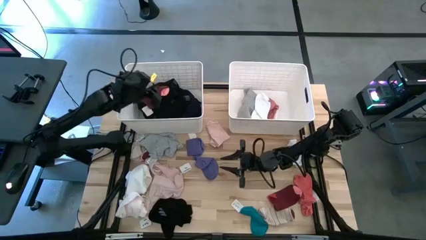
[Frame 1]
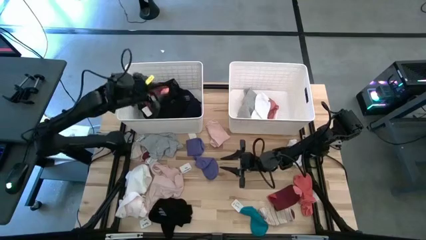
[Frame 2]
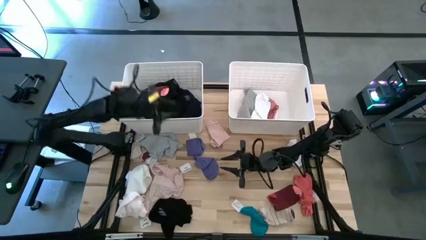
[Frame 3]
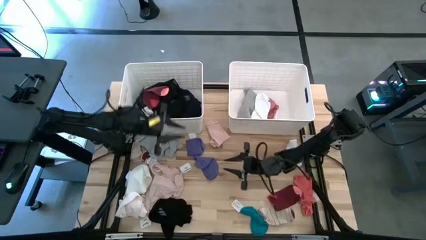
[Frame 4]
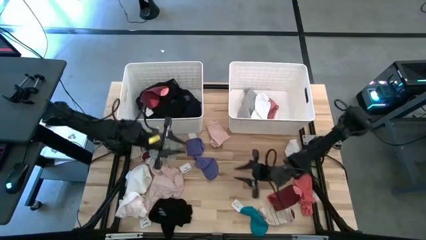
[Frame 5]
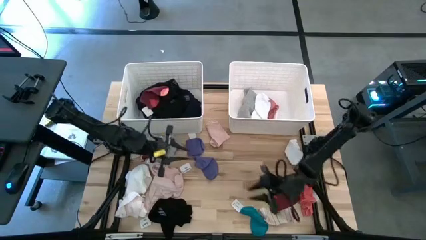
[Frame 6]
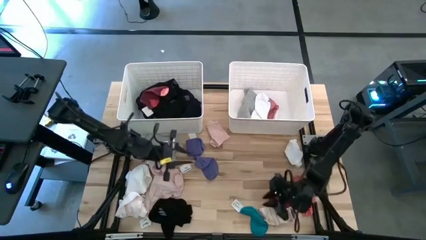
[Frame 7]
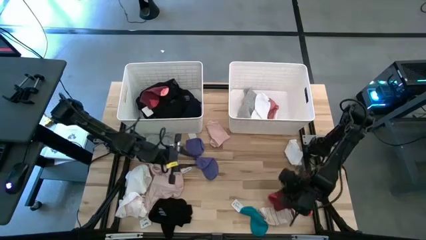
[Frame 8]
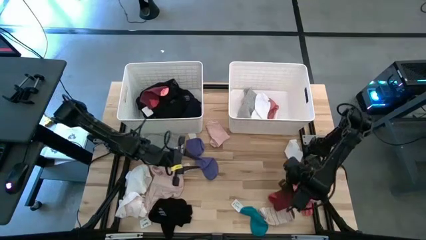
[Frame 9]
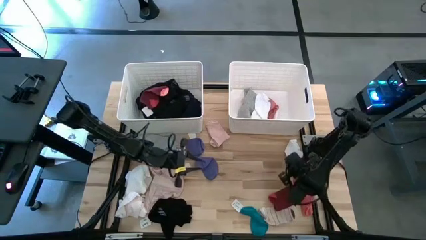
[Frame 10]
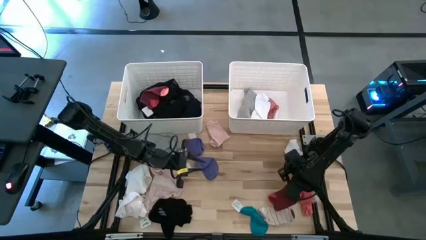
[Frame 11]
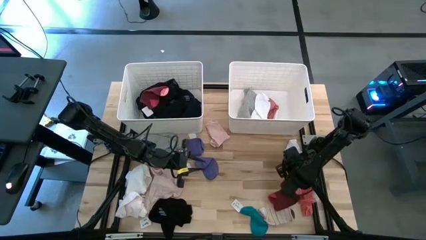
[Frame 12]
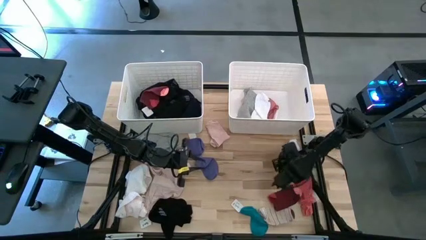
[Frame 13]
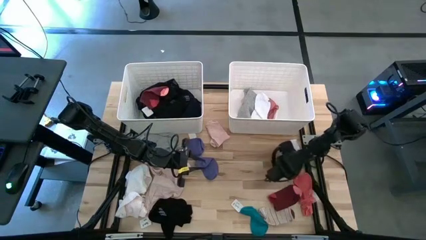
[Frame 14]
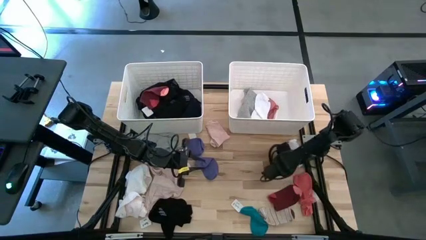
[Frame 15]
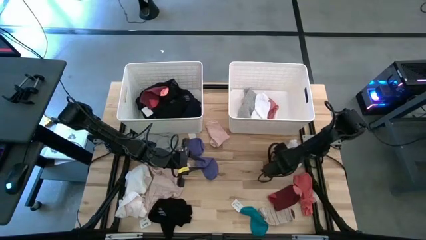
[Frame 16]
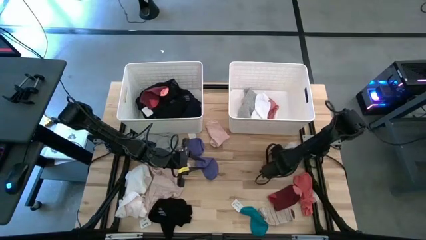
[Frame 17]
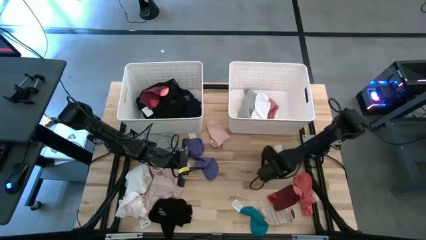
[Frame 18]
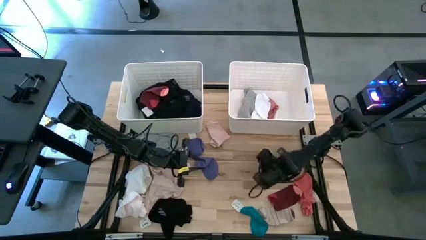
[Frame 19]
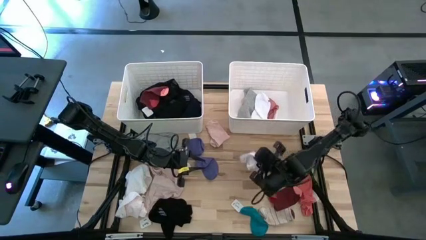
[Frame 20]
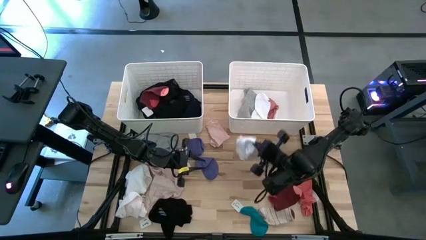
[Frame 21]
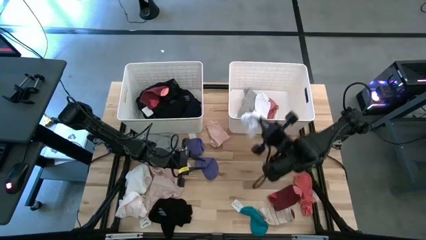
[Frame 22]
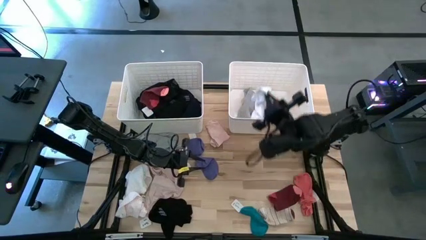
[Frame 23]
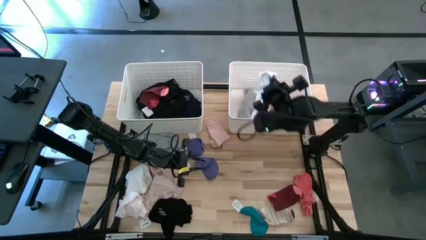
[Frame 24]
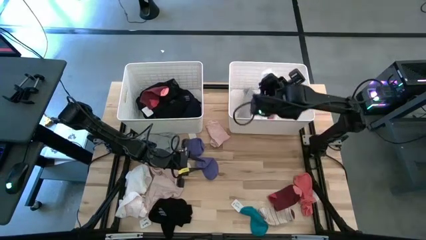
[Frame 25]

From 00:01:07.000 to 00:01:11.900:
Task: Sort clothes
Put the white sock into the right white laundry bin

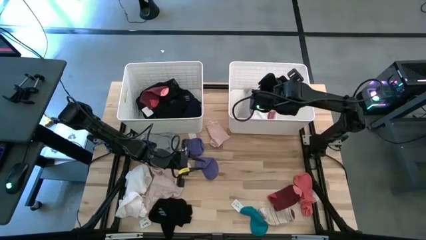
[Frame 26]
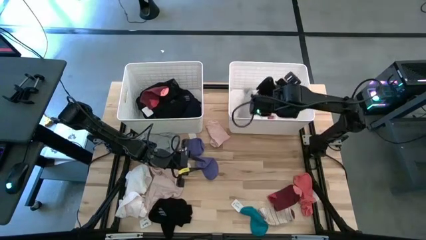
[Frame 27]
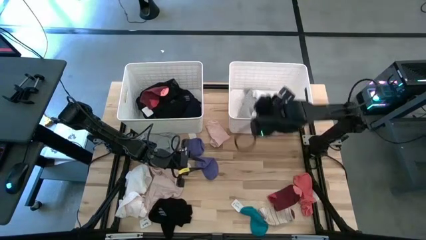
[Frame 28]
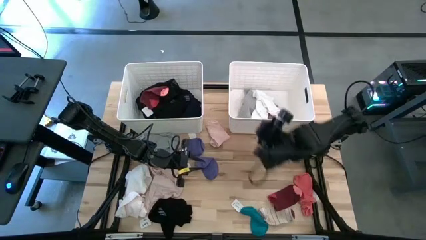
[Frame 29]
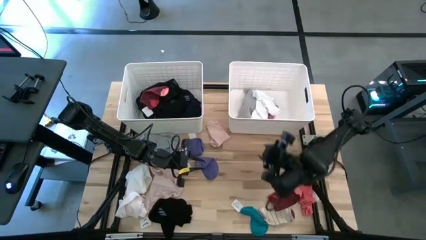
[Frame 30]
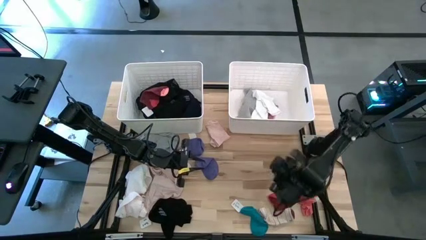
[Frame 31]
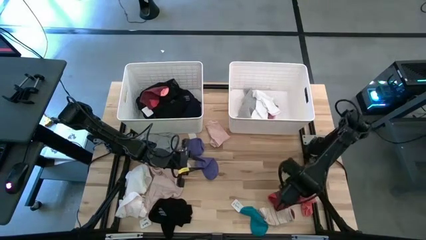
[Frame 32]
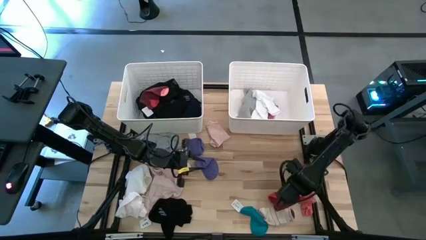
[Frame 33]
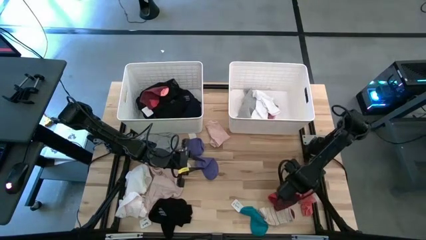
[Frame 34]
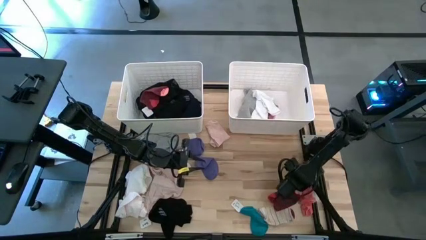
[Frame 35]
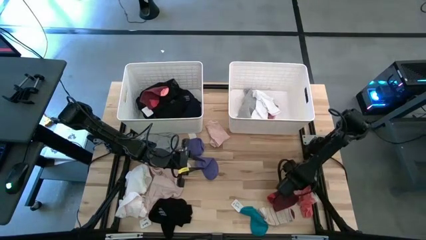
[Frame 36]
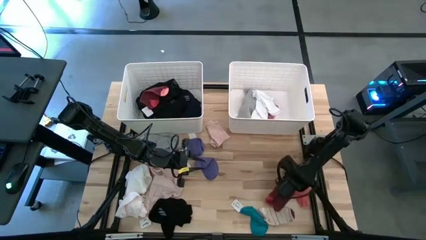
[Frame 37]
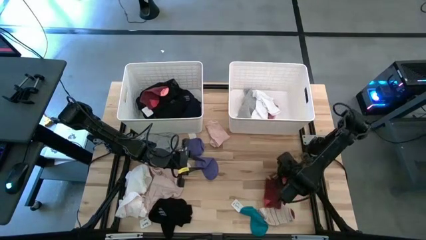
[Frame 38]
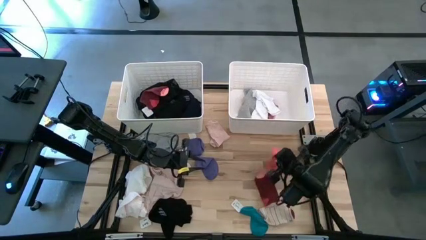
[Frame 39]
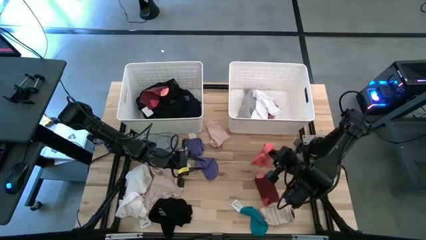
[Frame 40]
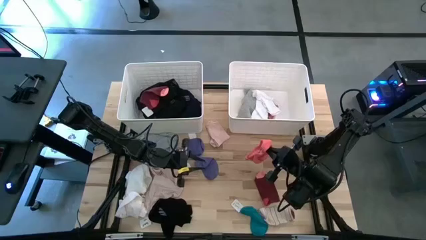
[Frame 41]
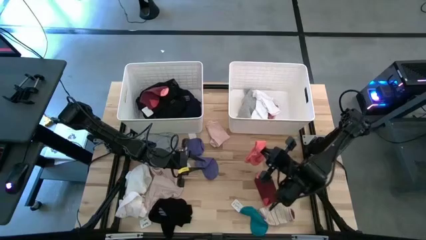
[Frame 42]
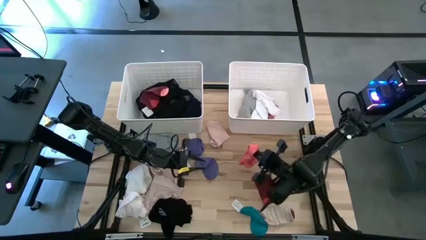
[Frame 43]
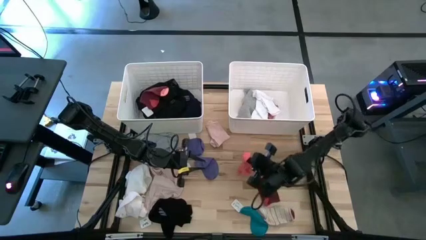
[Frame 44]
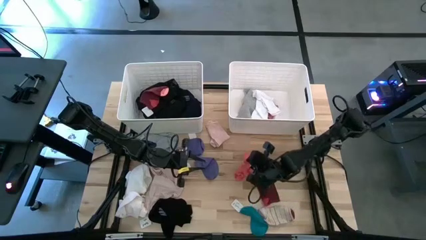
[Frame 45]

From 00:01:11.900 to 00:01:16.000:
Put the pink sock into the right white laundry bin

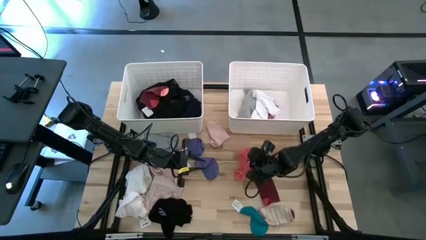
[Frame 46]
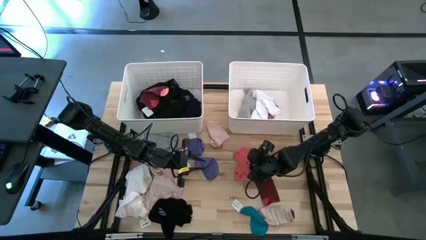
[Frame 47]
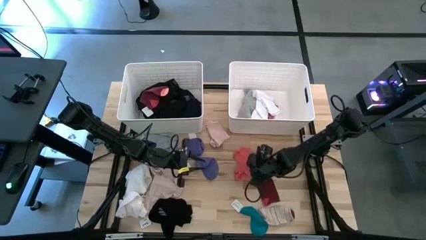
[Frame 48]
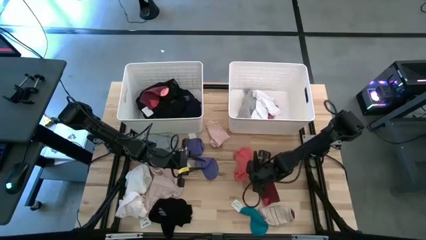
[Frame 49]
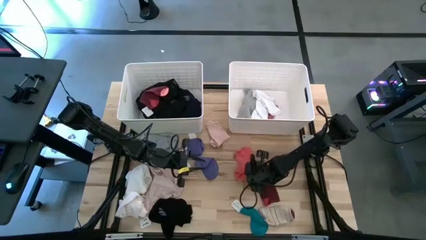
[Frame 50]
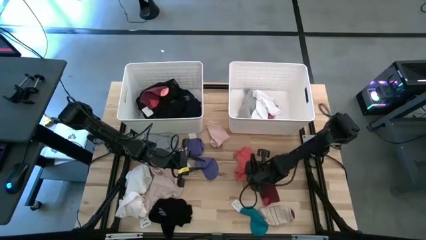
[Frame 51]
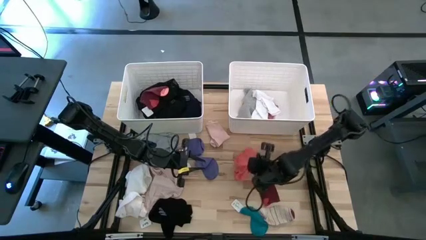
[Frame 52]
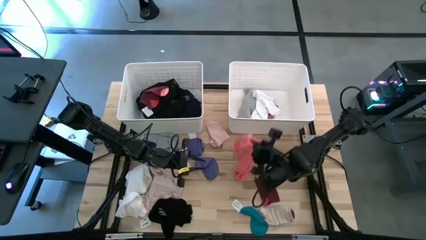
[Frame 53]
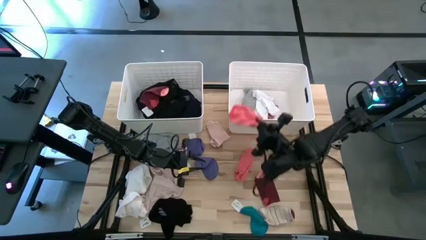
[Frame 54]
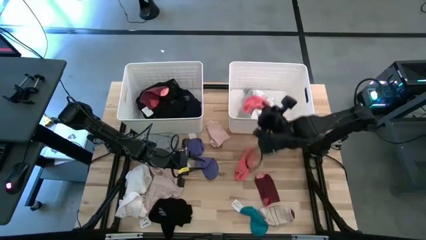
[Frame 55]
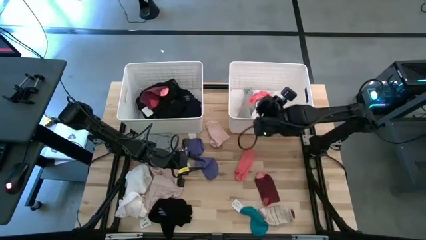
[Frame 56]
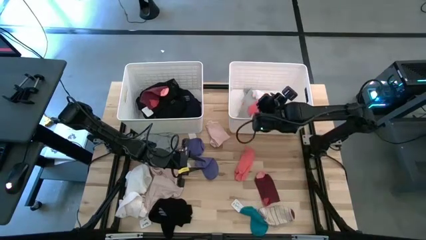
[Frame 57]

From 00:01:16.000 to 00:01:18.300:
Put the pink sock into the right white laundry bin

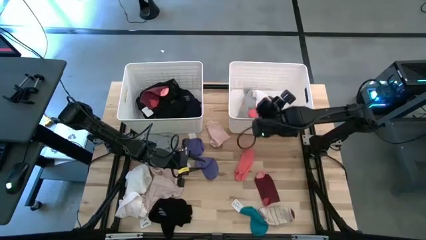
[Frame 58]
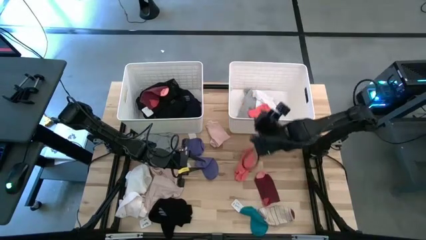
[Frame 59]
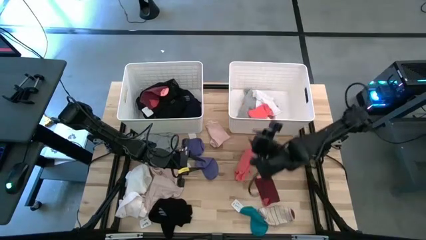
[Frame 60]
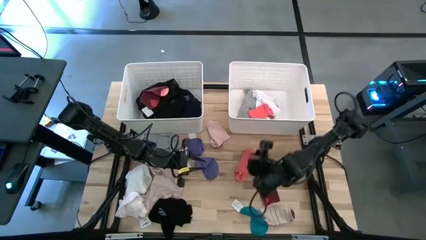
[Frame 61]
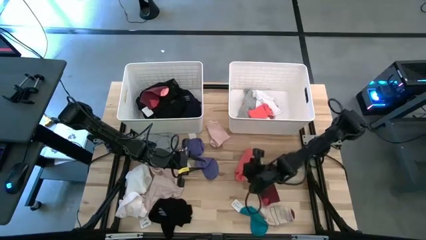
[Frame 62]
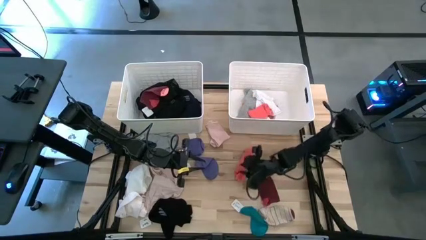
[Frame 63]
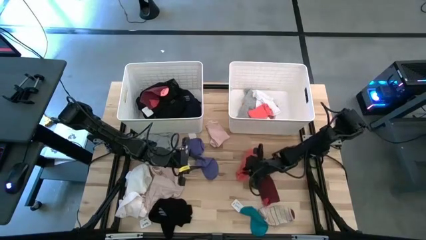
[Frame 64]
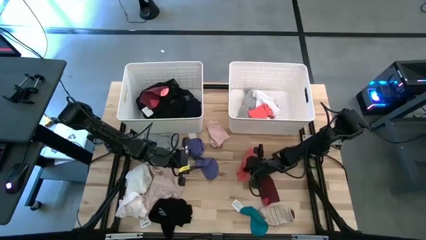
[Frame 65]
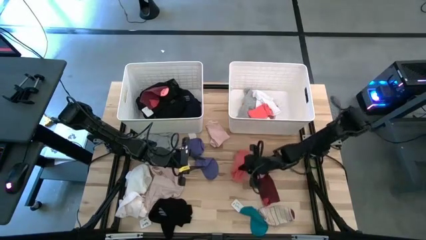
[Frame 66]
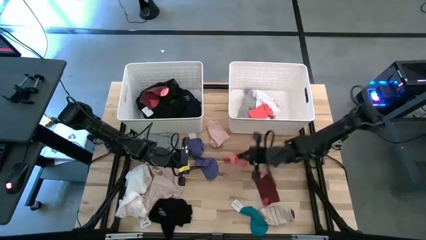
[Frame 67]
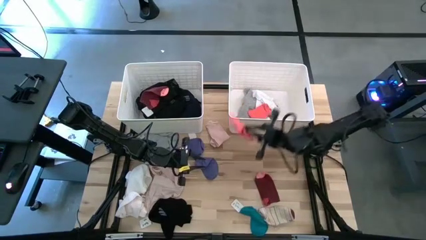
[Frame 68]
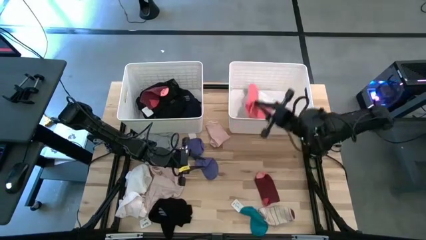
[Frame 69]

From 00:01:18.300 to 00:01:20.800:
Put the pink sock into the right white laundry bin

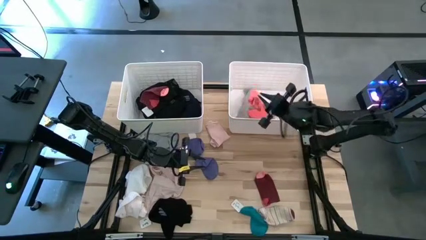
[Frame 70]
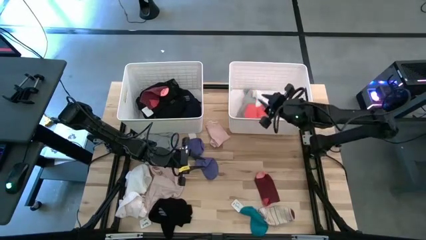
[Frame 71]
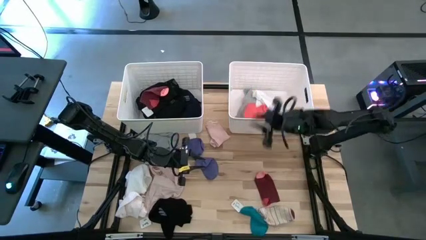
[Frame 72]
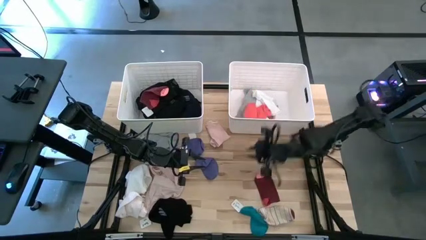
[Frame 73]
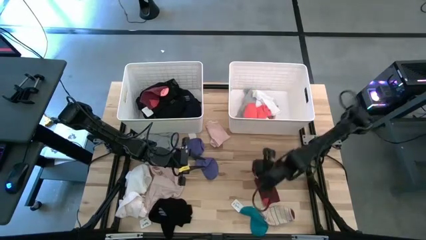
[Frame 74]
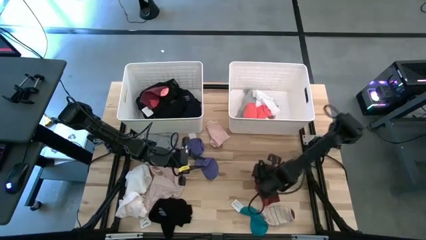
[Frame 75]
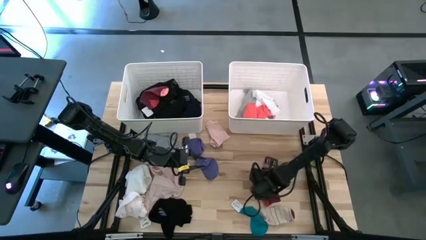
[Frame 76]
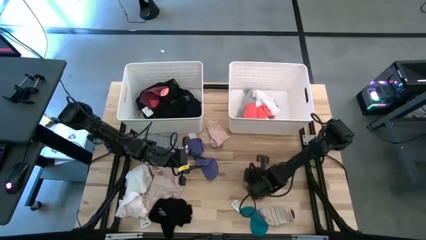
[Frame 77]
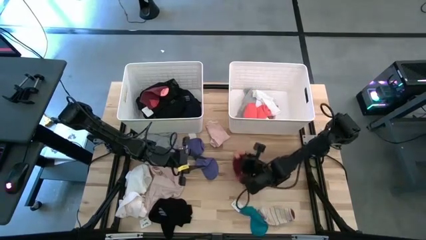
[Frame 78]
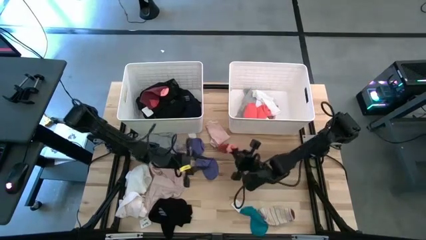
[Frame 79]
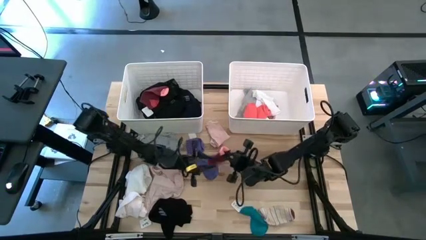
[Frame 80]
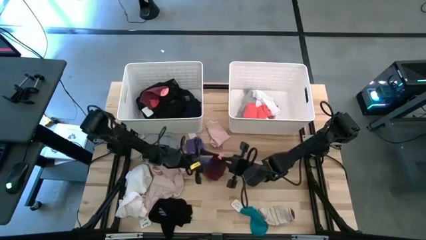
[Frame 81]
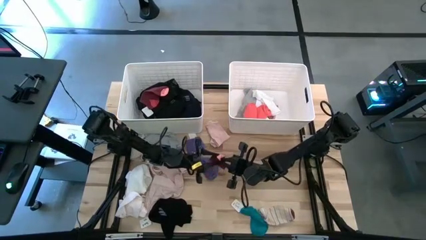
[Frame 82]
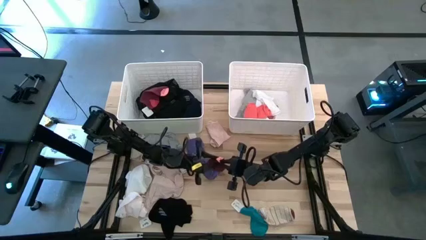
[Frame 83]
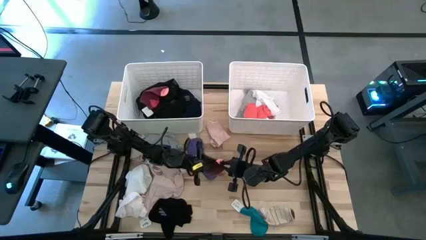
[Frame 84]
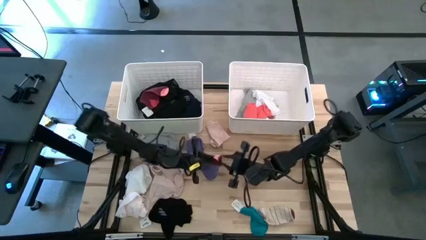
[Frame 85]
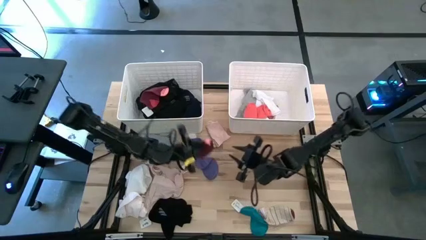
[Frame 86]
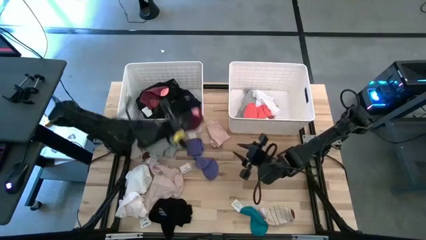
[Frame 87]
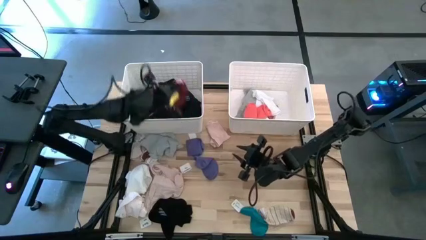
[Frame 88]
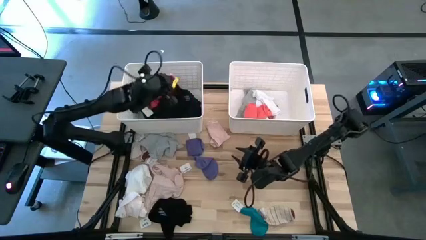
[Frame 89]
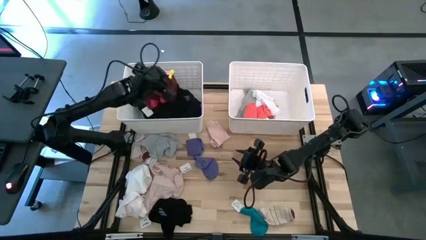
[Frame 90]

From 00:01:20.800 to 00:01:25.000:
Put the red sock into the left white laundry bin
